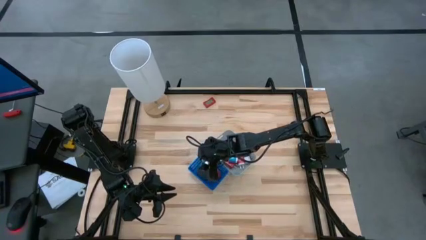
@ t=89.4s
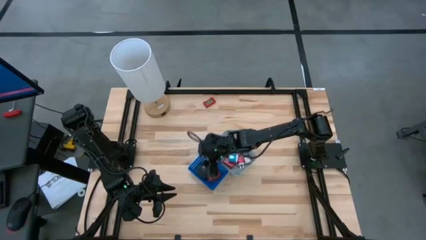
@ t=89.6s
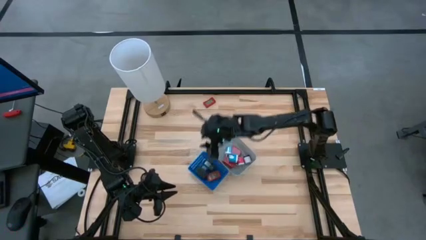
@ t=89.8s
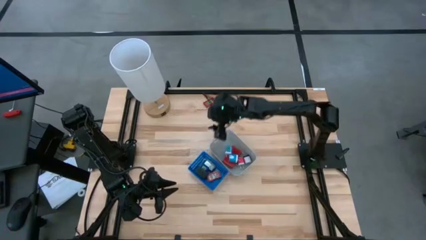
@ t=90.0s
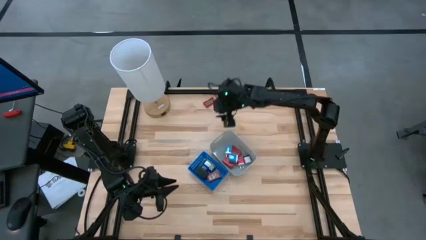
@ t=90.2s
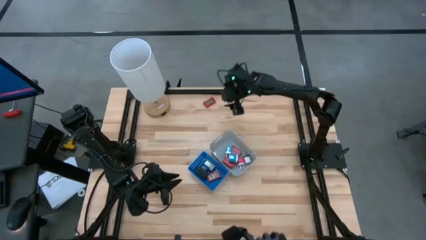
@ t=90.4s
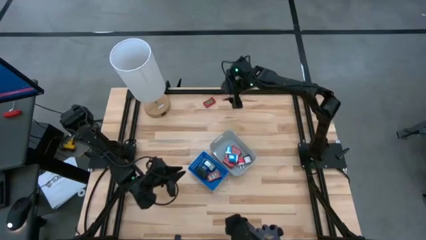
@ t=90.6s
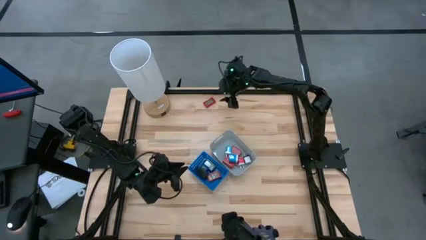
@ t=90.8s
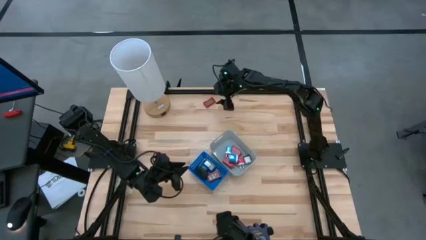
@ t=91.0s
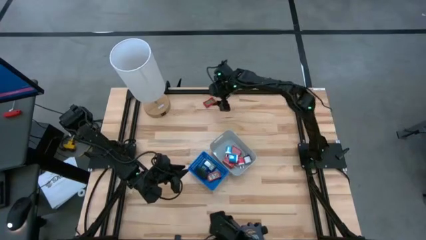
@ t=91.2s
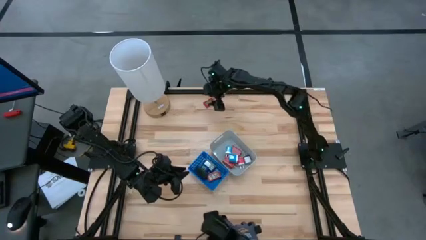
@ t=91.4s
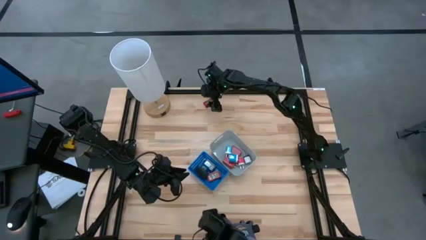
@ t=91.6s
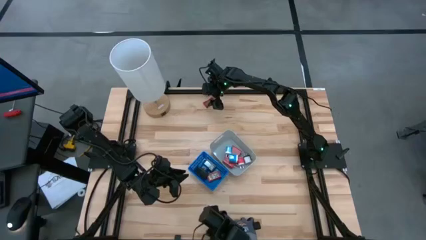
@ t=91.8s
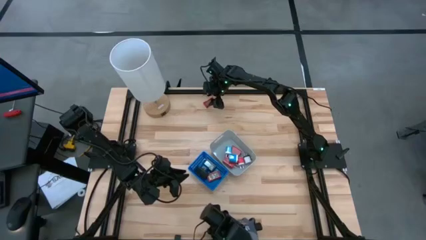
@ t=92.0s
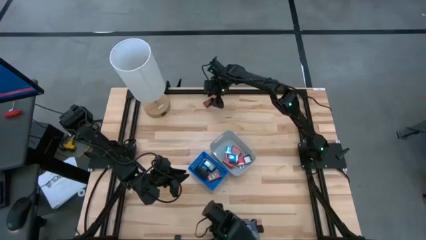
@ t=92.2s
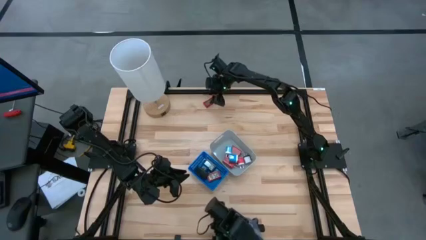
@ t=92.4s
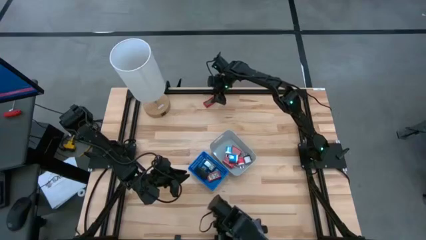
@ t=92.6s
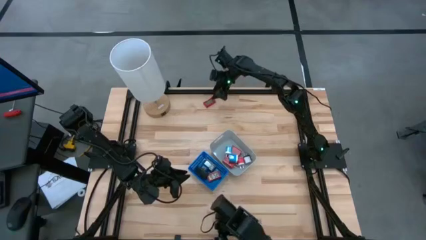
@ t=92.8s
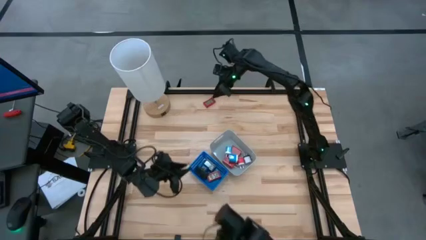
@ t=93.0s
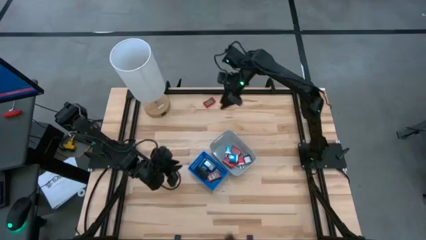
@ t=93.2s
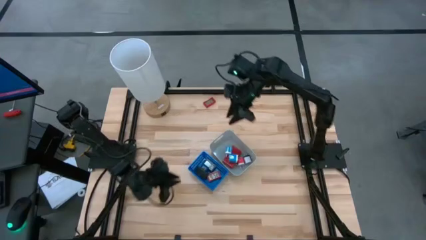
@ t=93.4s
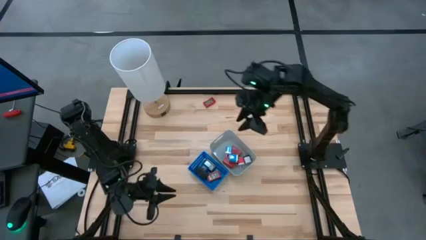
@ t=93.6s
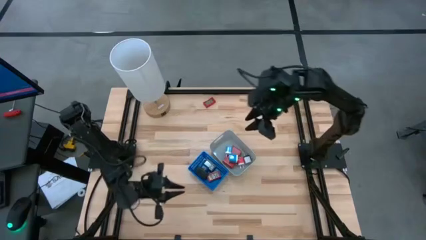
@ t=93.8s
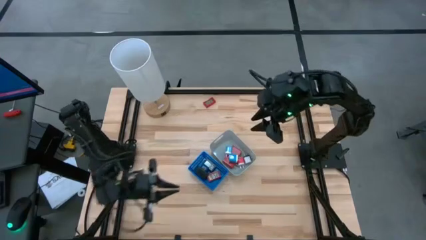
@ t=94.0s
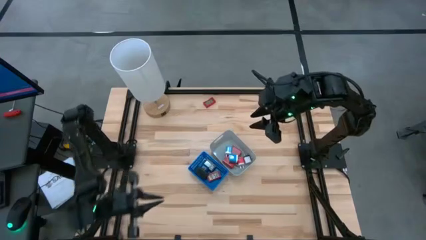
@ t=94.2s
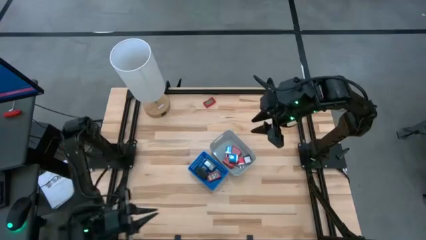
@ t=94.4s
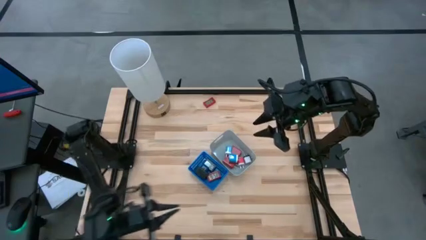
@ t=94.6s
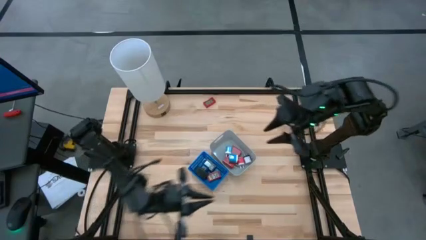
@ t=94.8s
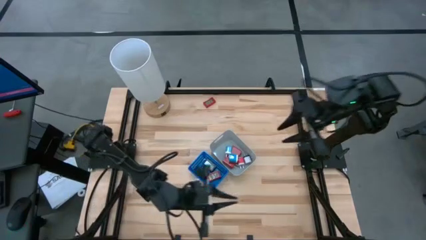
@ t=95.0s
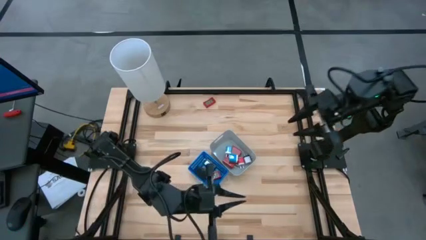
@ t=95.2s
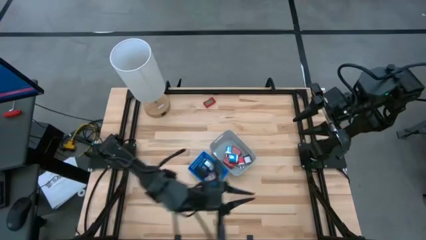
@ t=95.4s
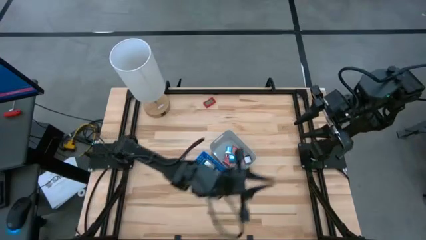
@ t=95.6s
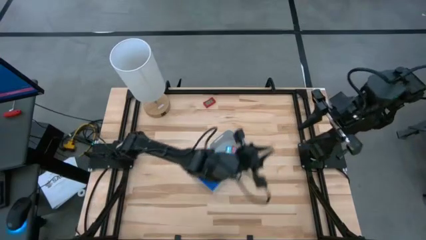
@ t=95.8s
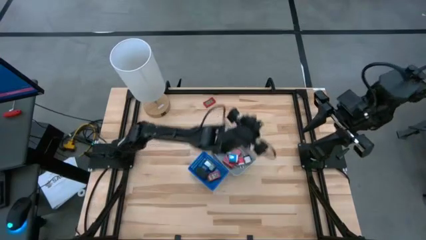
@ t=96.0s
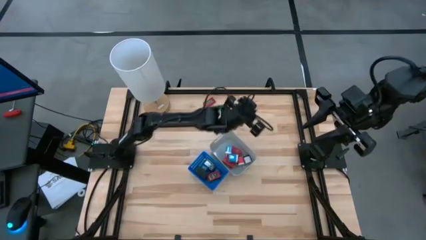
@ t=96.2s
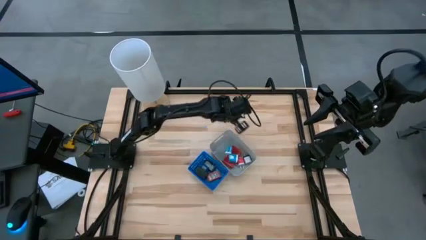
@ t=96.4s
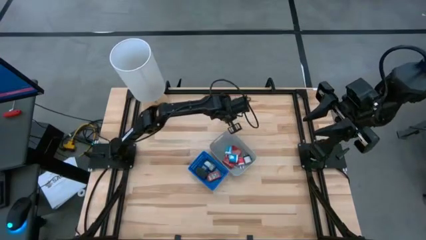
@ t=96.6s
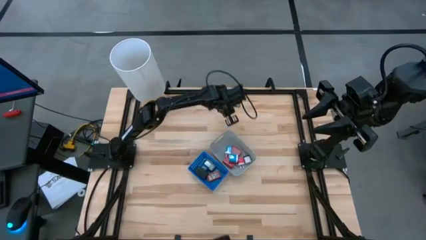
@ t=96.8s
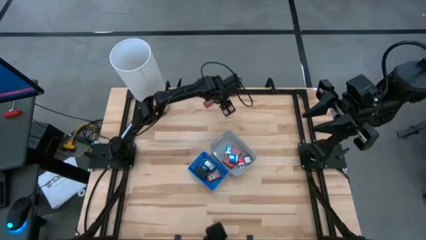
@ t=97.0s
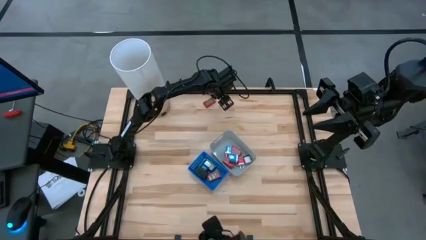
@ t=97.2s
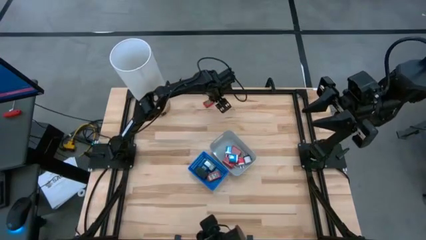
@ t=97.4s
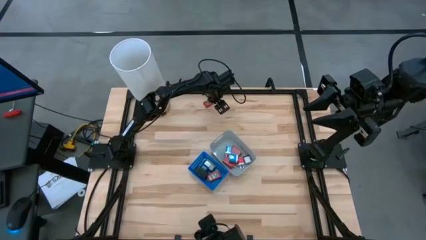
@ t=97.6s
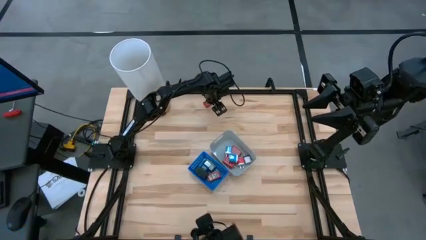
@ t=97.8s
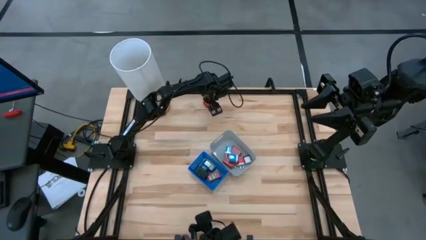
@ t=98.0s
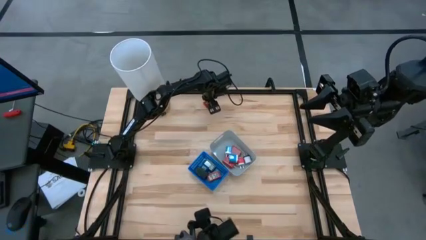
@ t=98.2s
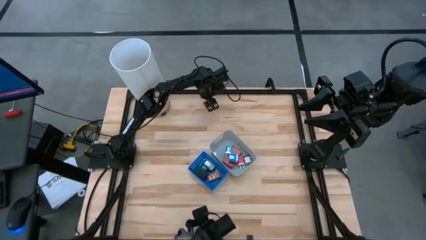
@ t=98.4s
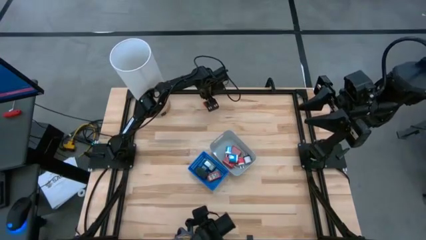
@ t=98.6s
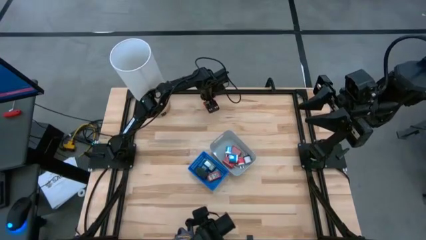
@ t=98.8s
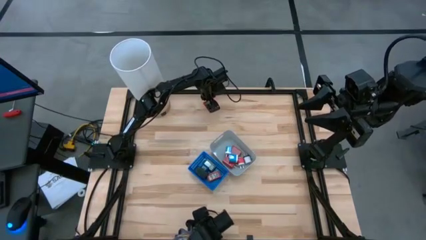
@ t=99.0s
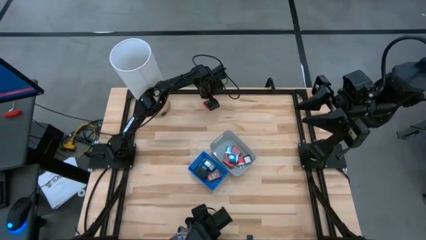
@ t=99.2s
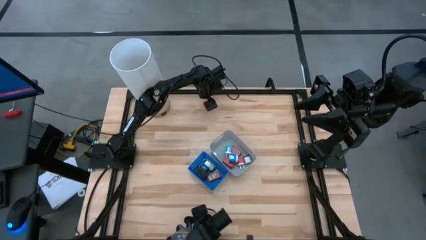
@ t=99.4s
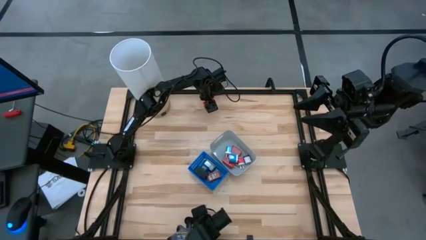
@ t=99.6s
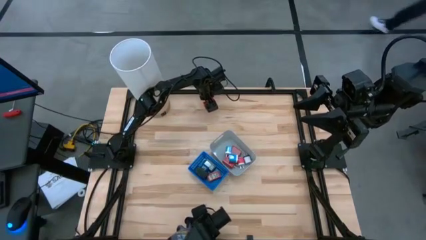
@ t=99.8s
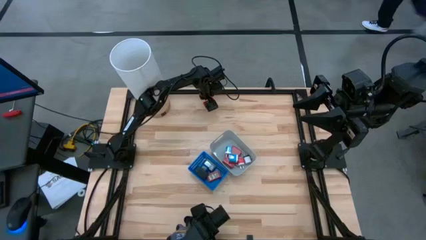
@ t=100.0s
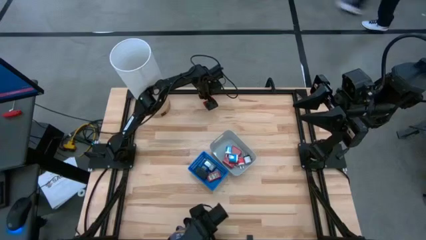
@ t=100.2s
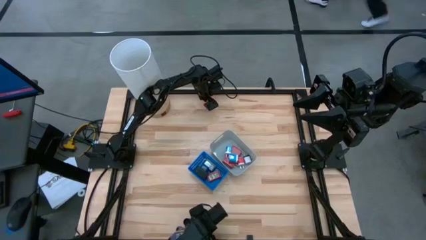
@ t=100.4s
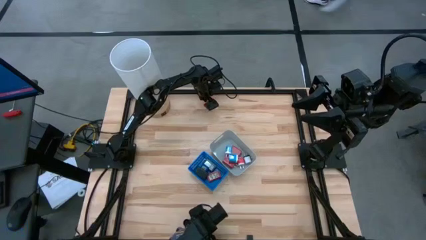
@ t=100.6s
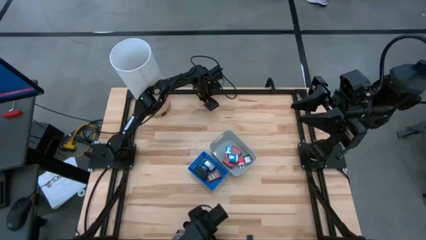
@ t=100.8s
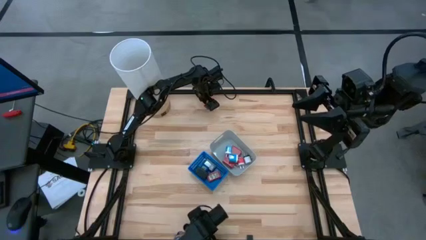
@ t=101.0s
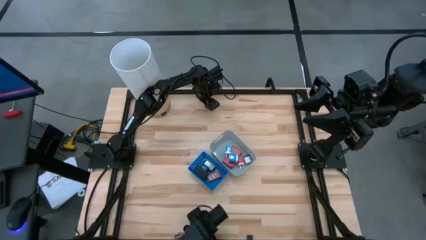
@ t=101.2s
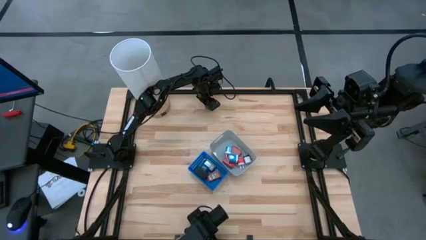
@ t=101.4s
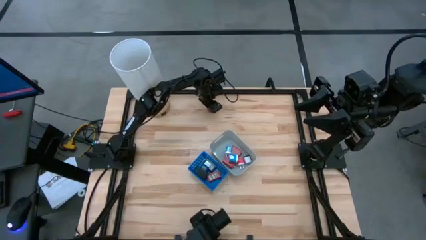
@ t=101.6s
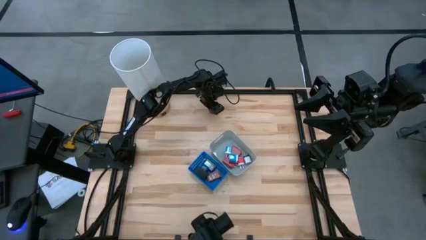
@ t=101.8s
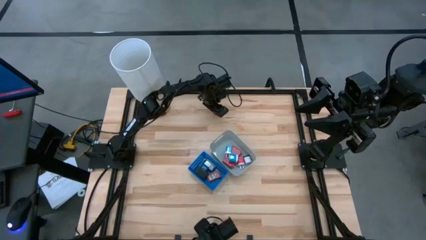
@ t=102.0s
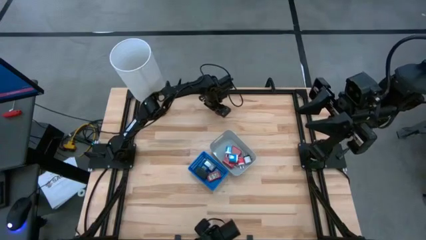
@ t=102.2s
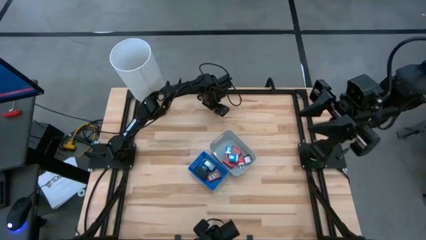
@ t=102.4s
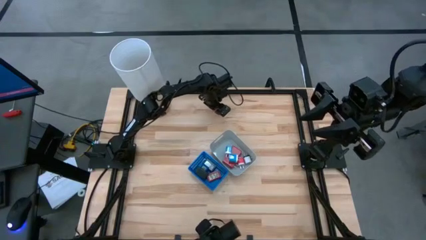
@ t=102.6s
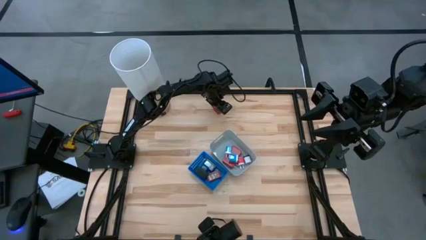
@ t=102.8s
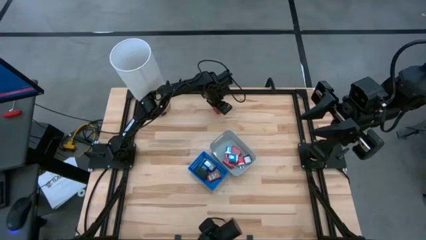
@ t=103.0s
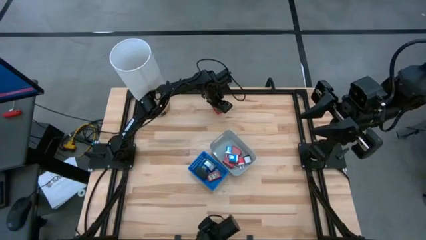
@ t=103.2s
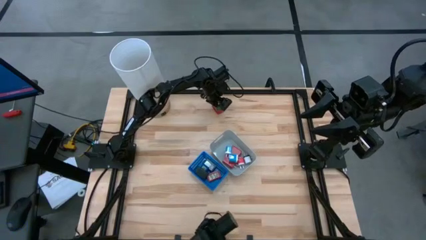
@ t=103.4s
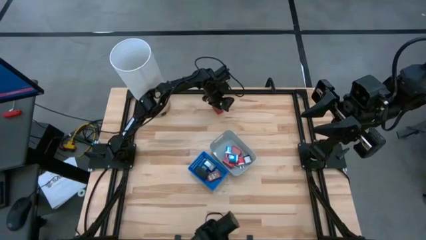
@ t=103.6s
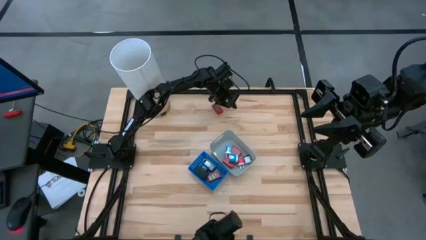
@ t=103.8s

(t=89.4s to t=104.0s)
Task: Pick & Place Office items
Put the red digital timer into the blue bin
